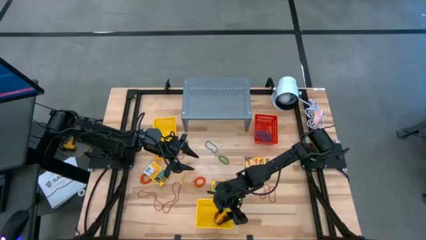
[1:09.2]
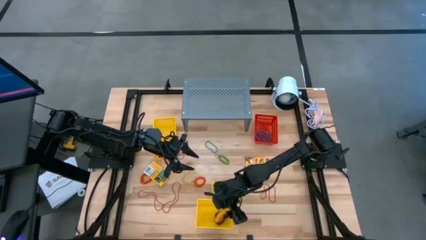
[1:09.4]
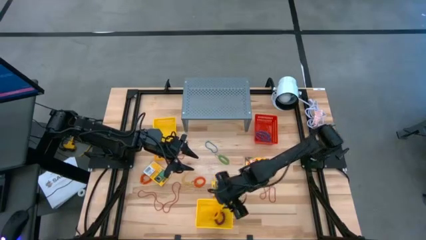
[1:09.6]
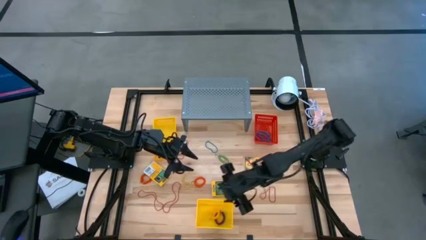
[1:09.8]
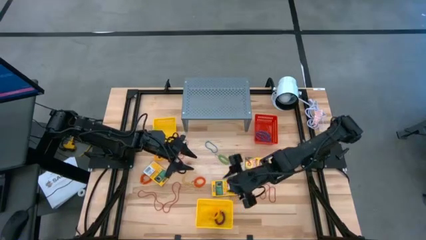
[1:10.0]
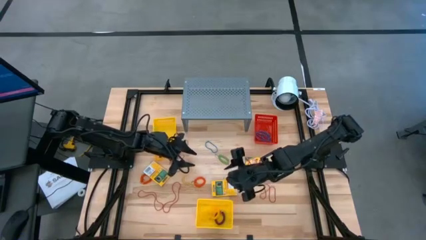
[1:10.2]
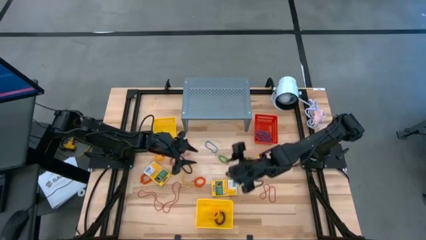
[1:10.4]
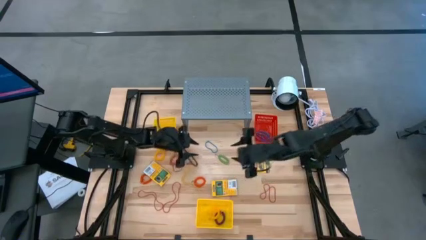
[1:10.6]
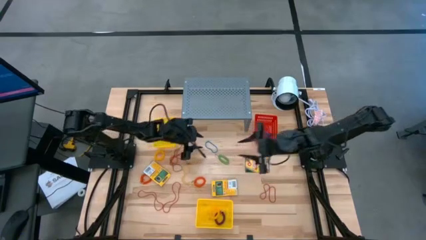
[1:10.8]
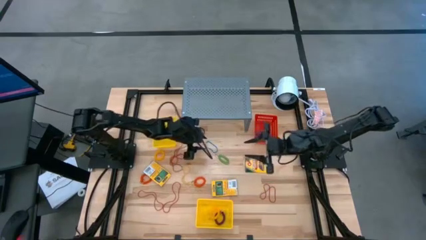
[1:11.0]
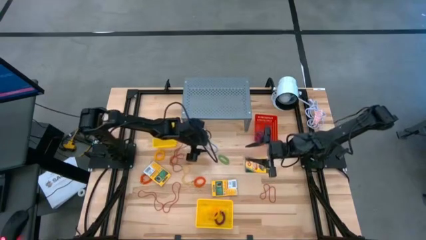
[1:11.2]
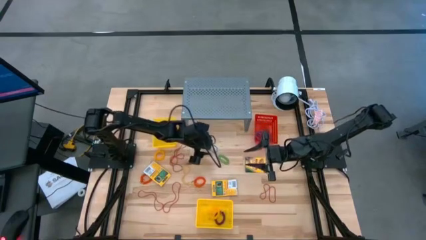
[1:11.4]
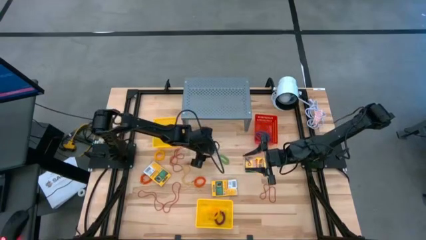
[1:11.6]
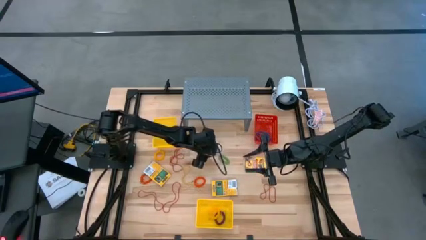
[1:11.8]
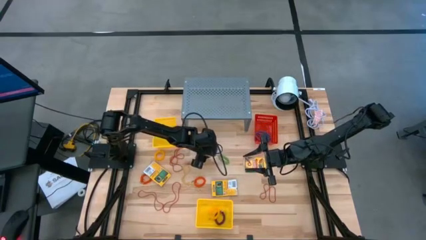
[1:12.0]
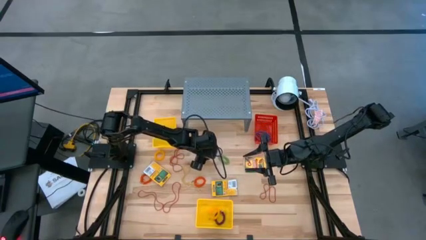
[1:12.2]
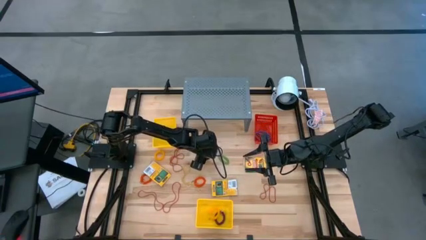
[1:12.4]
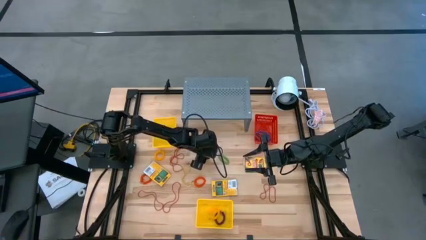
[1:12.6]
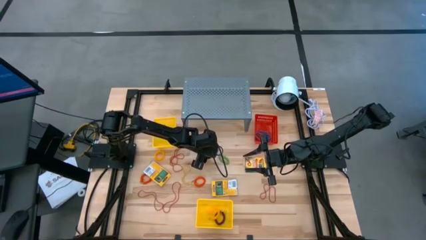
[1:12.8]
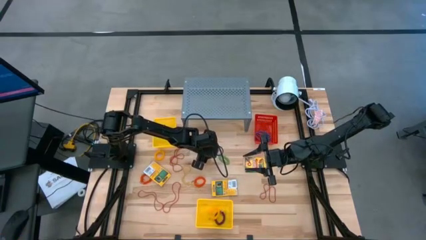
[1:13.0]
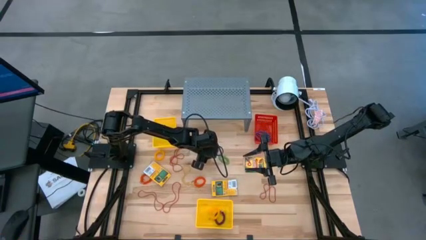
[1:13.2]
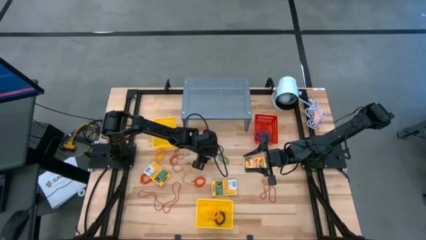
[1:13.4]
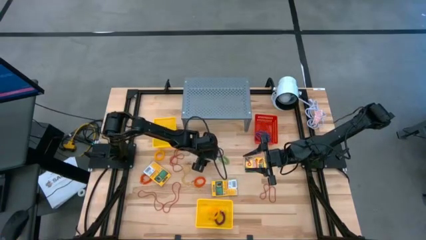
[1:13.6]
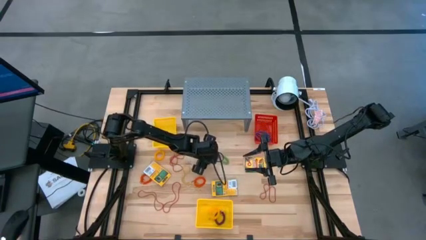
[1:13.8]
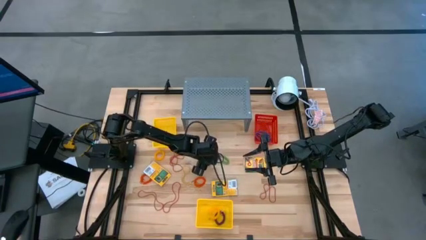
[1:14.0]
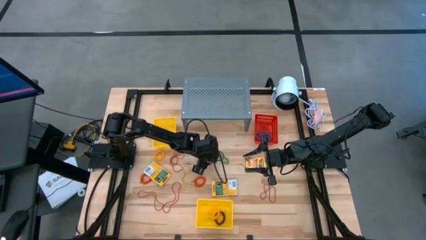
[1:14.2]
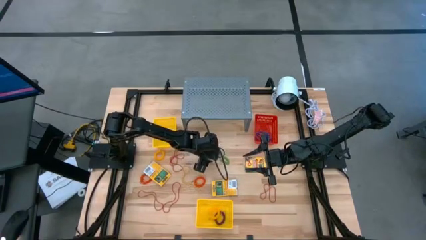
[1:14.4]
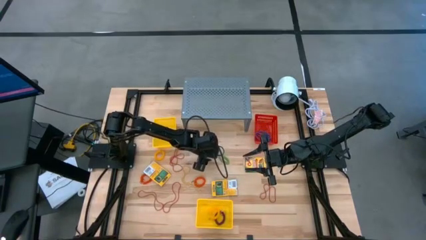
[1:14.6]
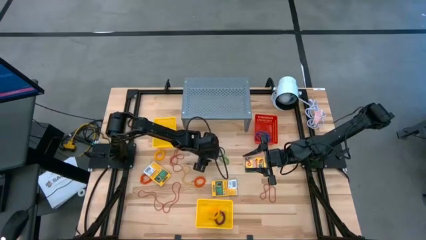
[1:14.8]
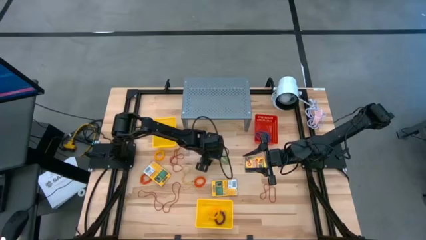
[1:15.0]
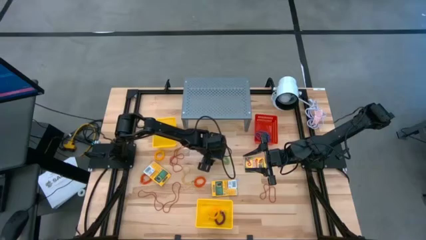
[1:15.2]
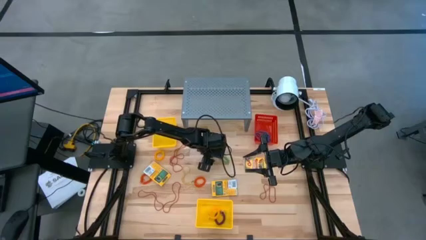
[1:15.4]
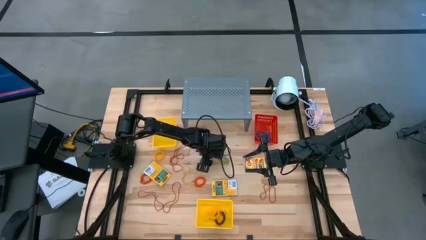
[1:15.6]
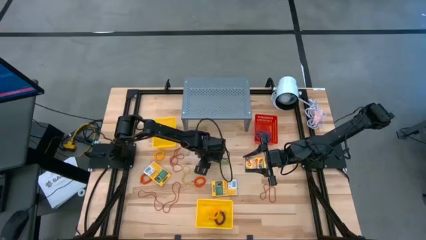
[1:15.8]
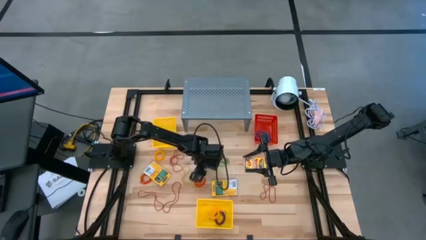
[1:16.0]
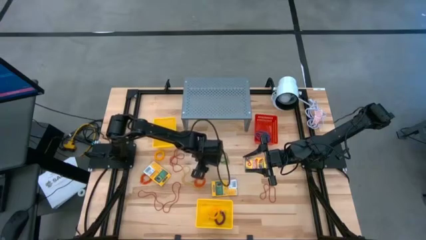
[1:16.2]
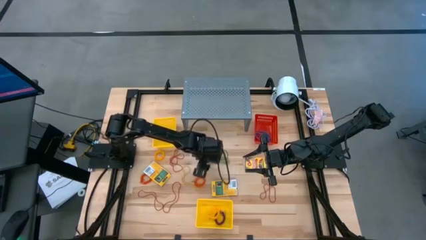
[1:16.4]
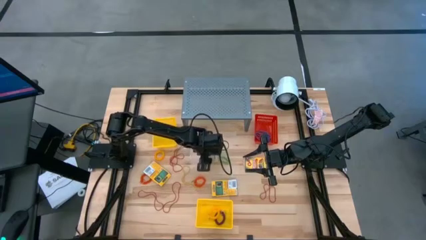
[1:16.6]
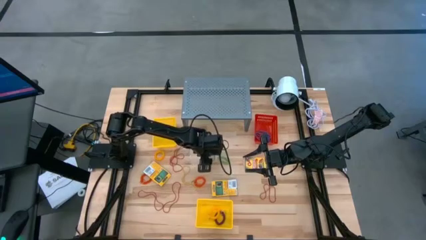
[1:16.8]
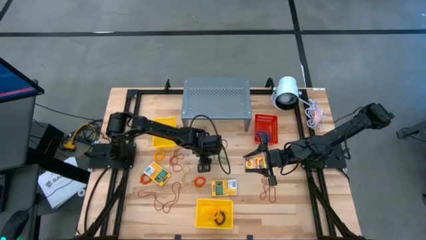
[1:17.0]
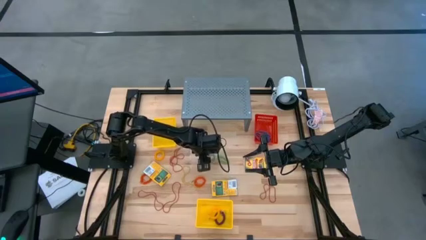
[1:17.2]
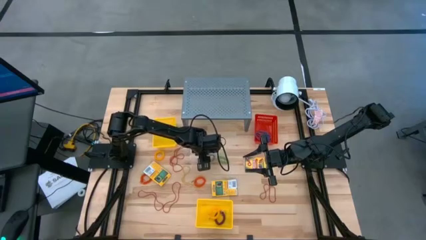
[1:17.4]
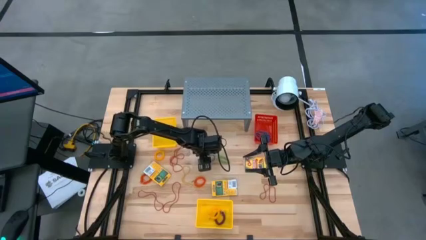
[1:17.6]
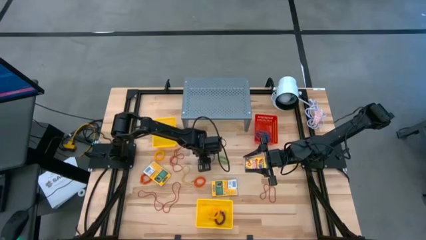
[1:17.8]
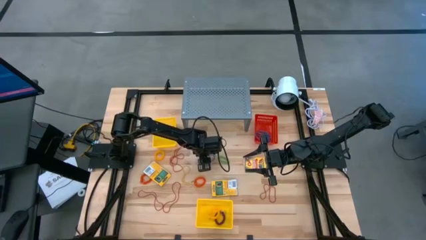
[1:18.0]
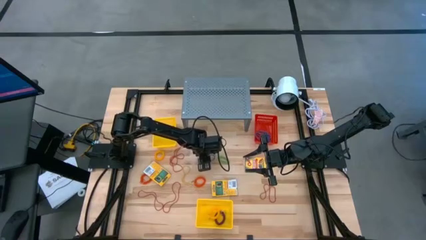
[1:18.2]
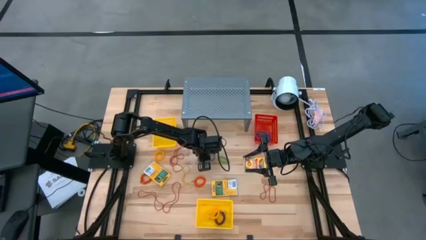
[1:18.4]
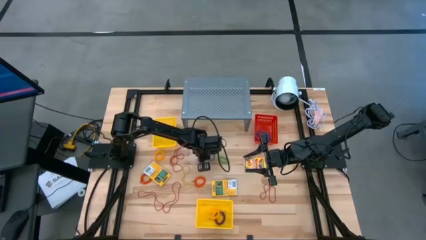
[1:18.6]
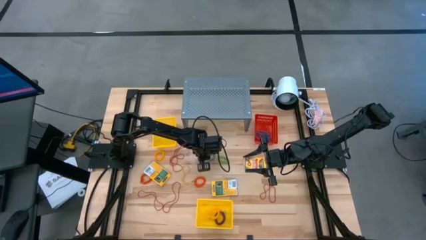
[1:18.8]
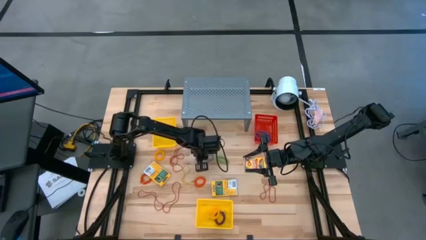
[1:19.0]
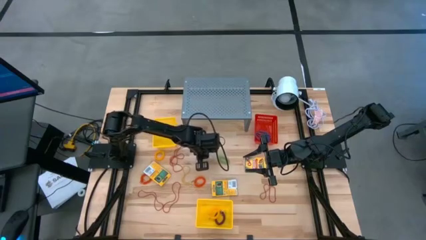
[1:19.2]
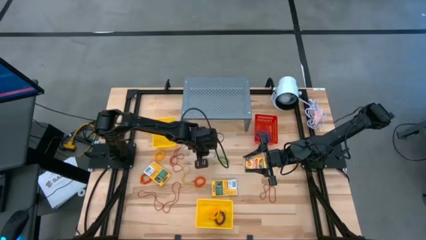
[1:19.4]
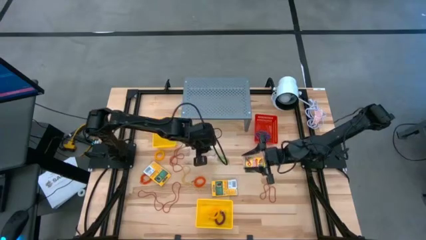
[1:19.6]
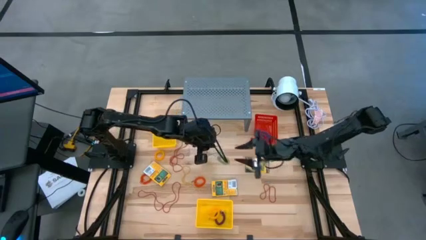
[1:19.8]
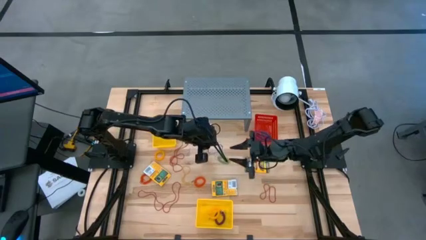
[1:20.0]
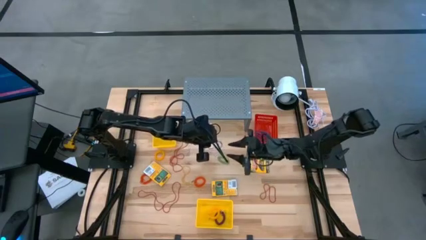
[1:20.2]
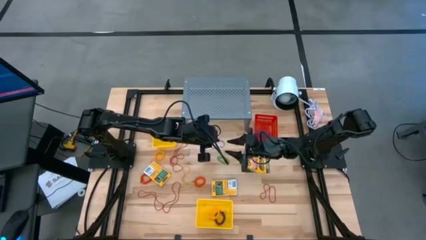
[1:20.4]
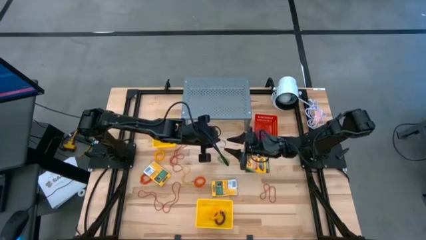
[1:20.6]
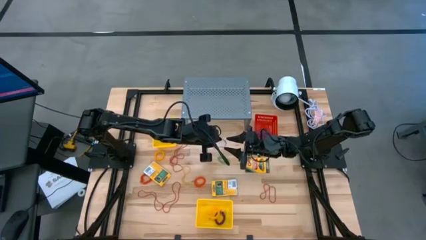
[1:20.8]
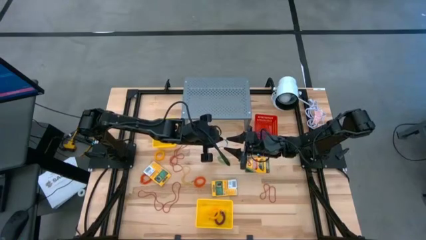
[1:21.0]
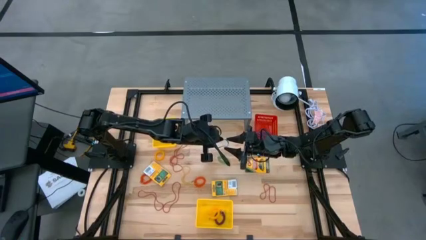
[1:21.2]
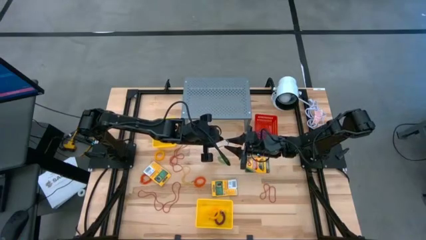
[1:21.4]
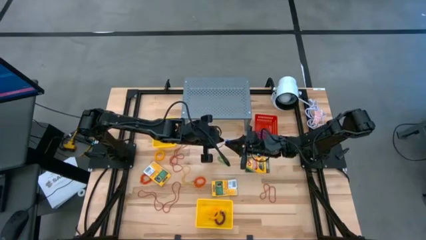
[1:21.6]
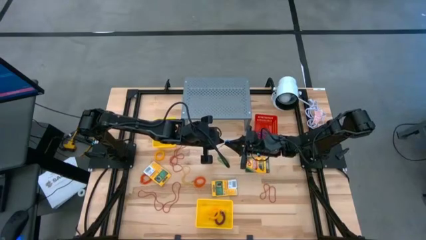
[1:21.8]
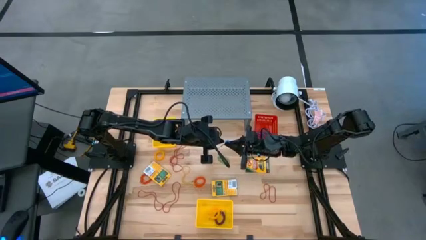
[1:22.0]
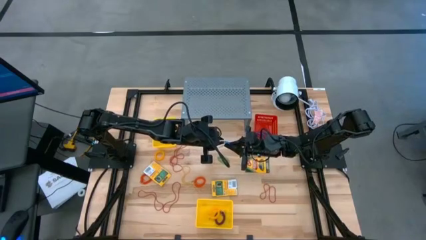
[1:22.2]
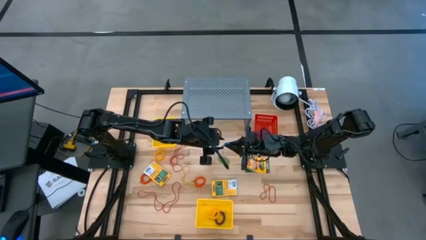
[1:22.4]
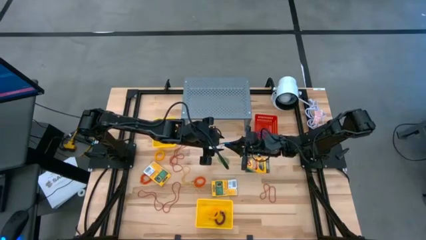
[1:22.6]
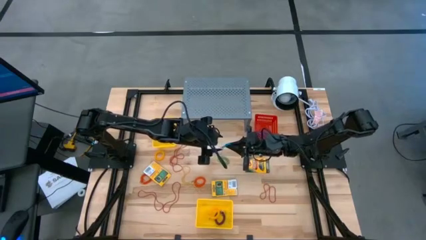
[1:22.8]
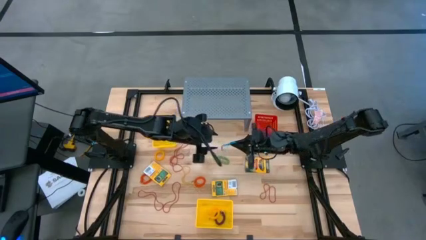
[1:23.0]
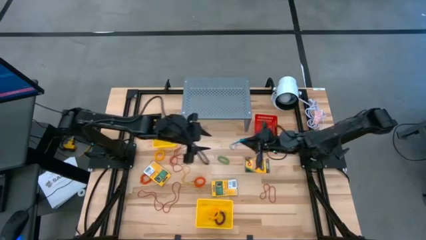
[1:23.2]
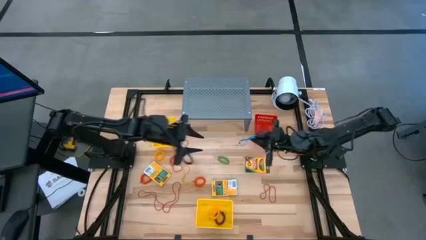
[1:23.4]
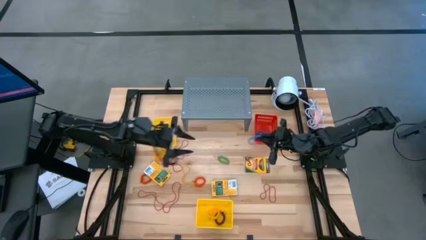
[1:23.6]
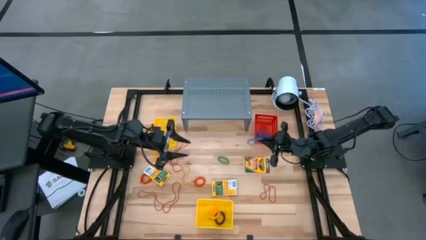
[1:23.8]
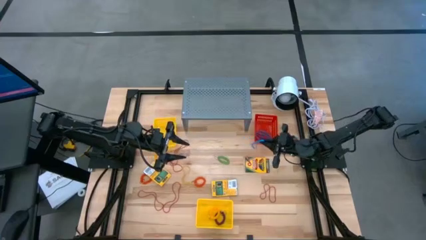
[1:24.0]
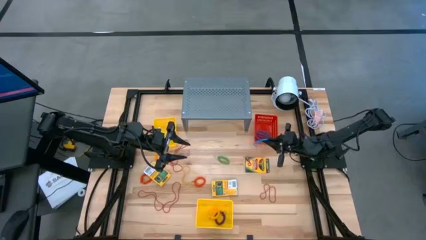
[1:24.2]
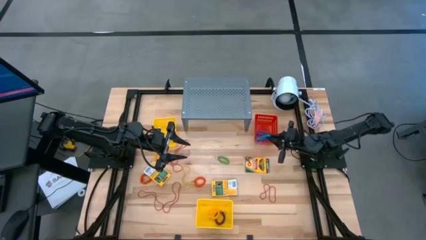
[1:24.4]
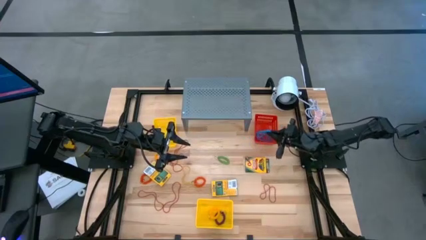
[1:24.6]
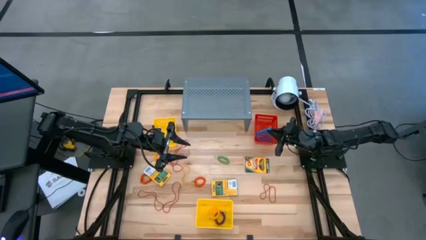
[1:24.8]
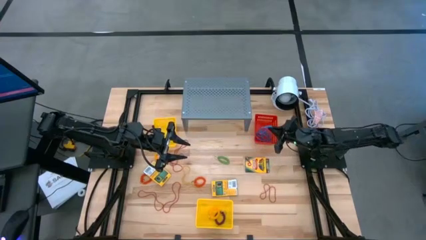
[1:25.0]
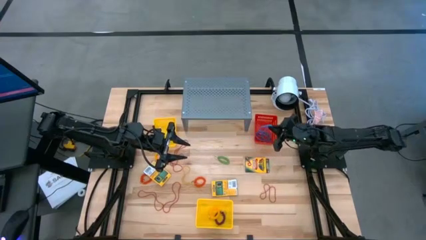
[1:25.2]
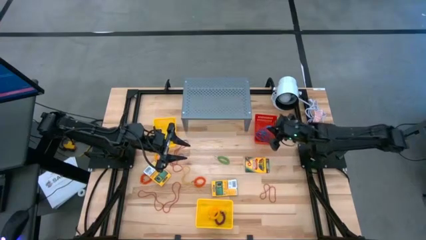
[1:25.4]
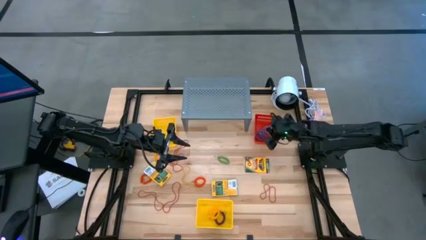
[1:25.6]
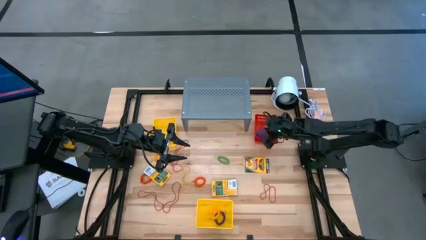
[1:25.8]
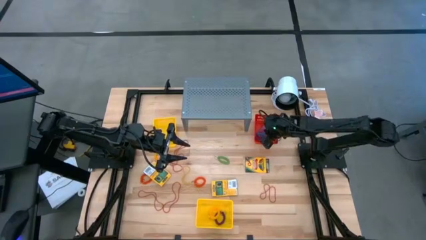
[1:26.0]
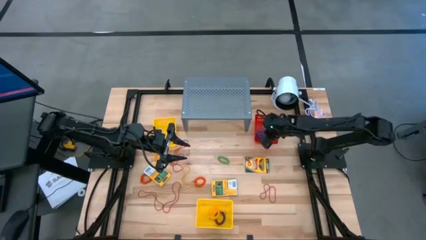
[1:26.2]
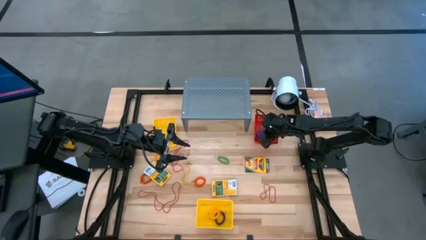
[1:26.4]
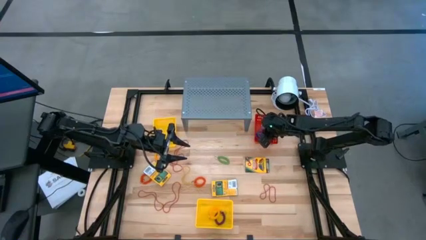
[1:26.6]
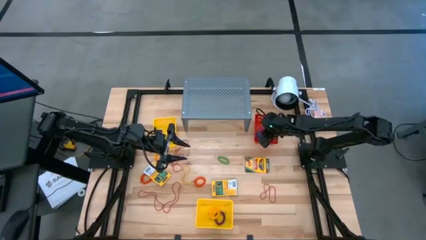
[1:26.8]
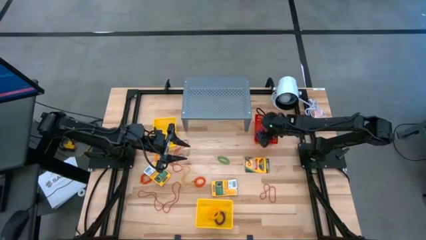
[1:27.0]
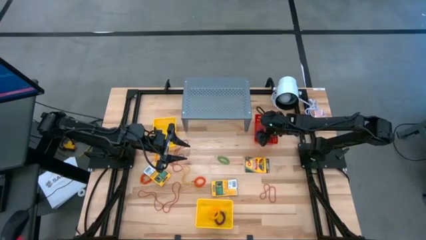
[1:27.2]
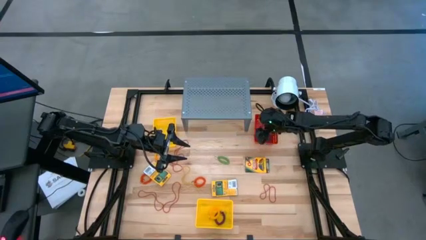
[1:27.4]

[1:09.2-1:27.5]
Task: Pick & Place Office Desk Supplies
Put the blue rubber band into the red bin
